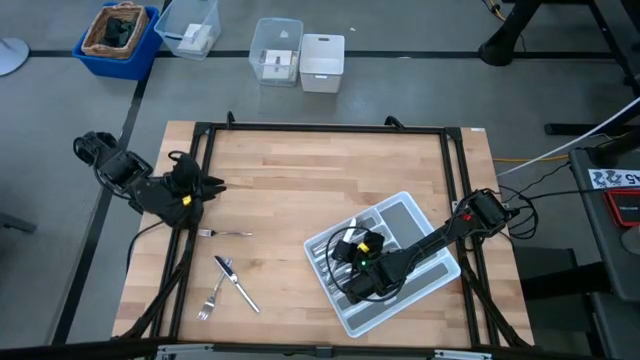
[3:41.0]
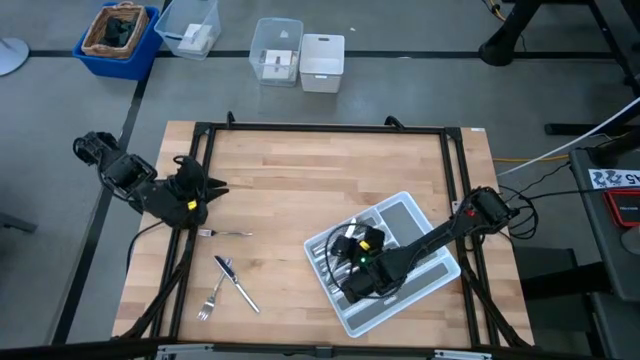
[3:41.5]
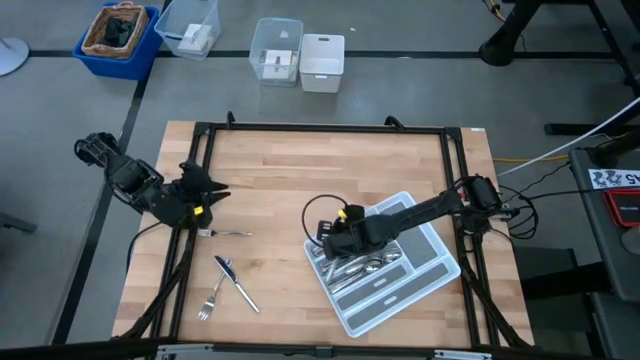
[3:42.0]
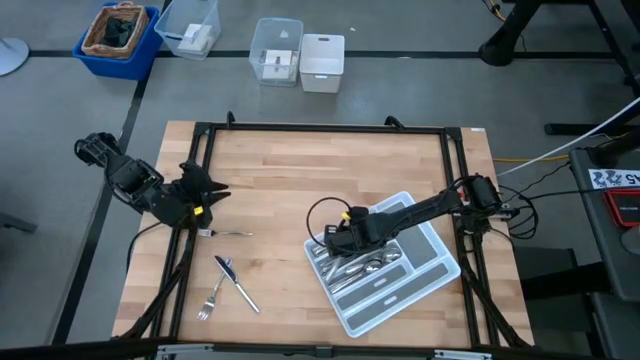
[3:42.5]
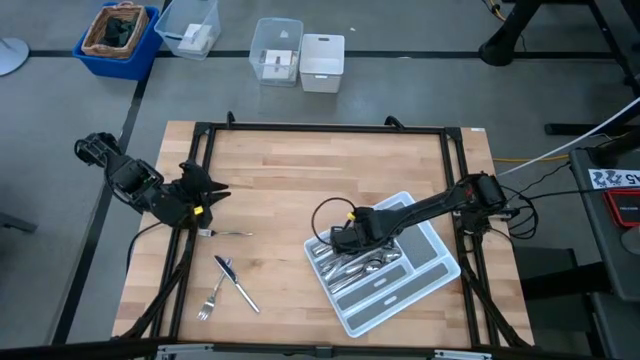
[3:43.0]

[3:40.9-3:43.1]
Task: Sort silverware
Put the silver table knife into the silverware tray

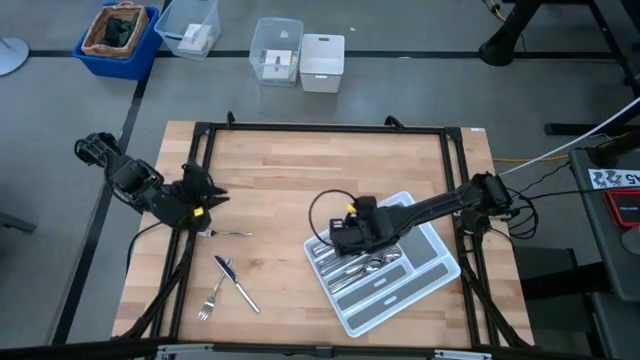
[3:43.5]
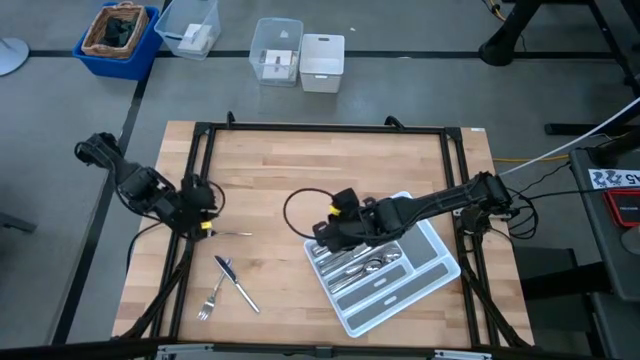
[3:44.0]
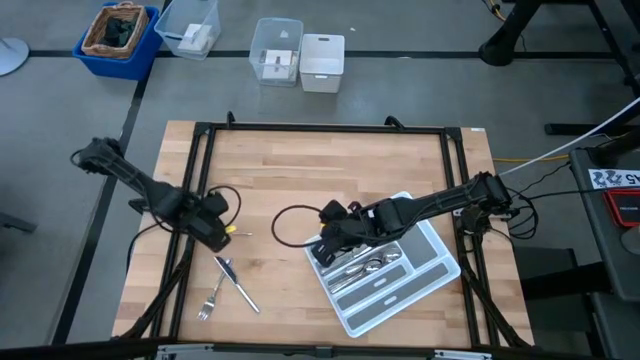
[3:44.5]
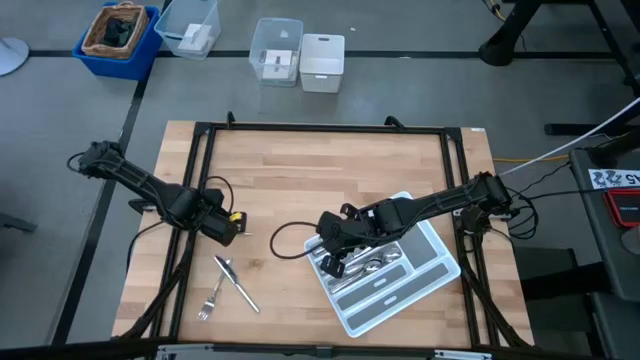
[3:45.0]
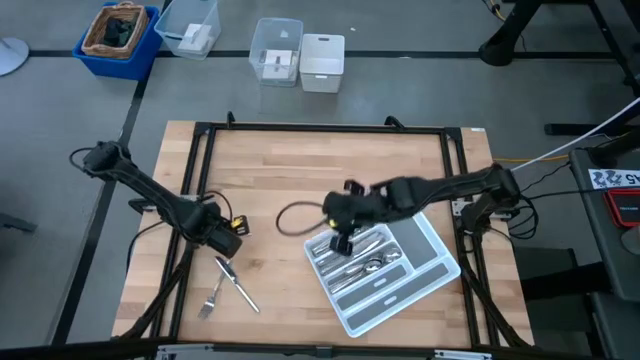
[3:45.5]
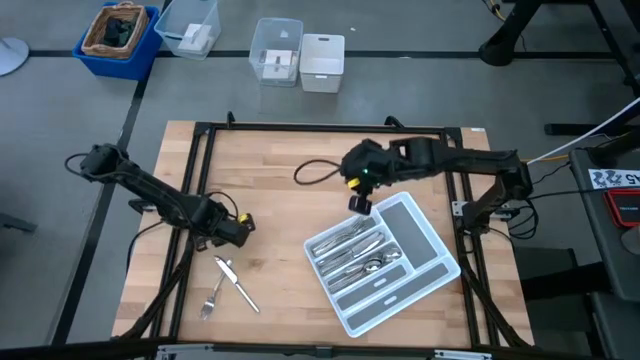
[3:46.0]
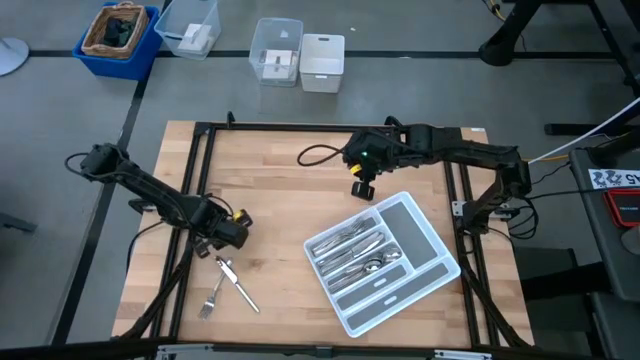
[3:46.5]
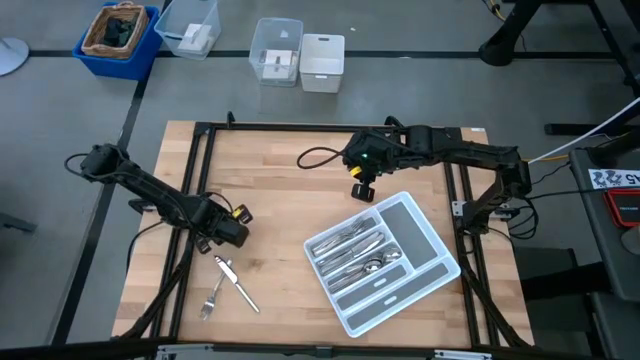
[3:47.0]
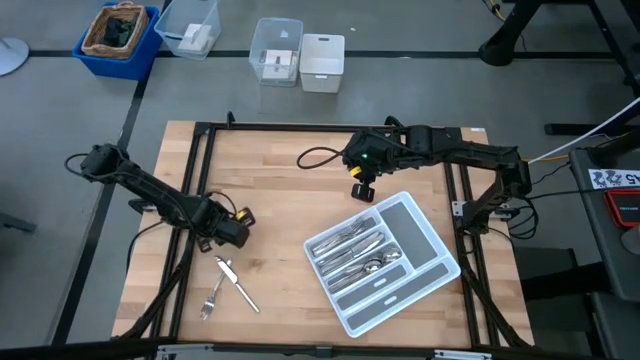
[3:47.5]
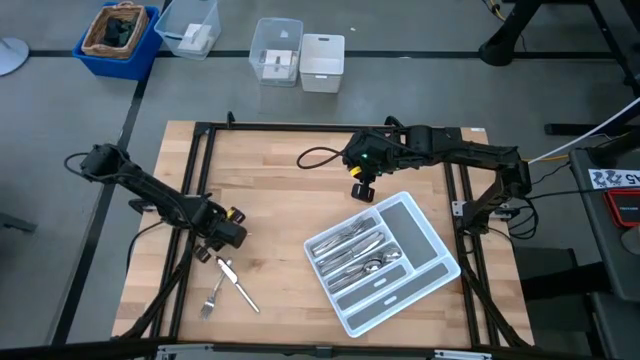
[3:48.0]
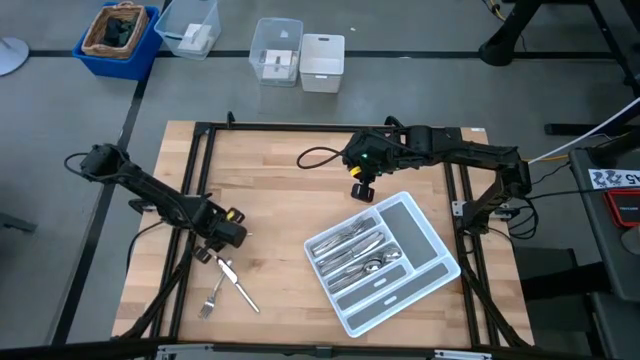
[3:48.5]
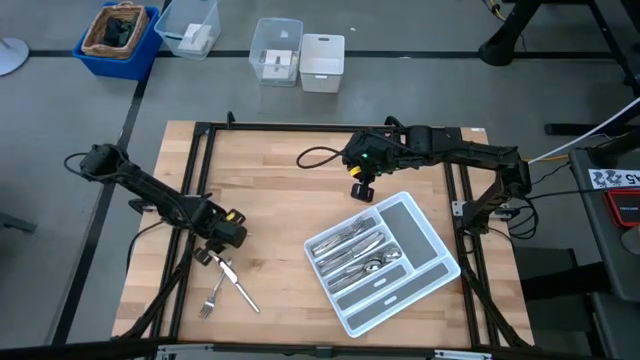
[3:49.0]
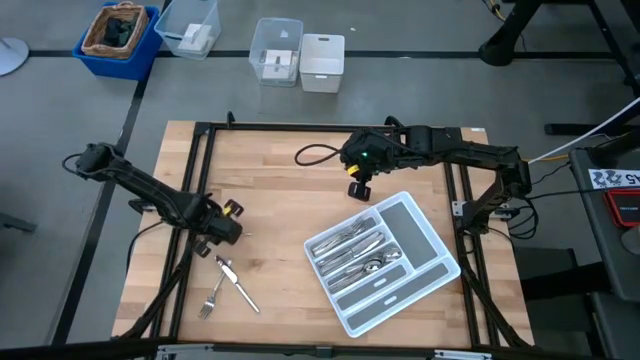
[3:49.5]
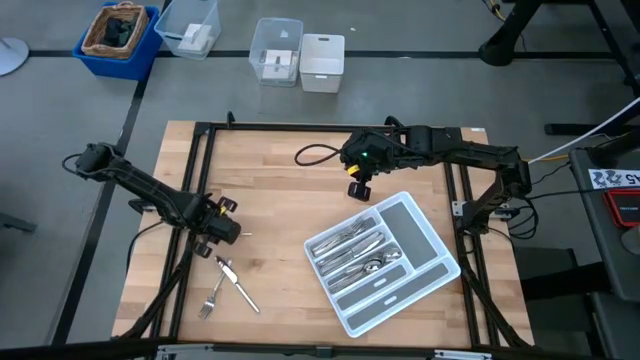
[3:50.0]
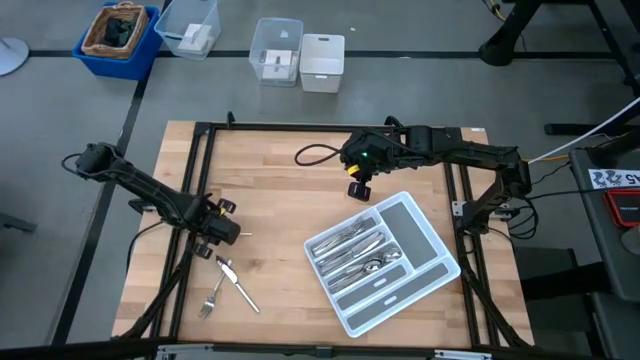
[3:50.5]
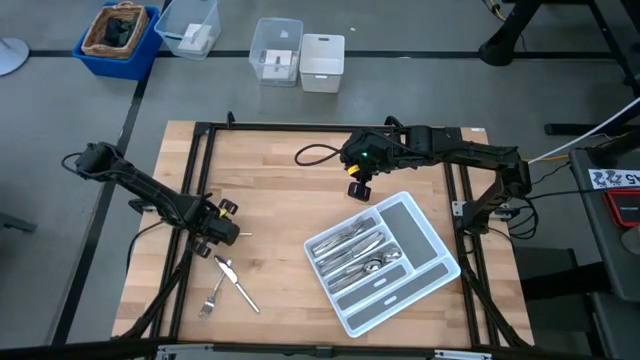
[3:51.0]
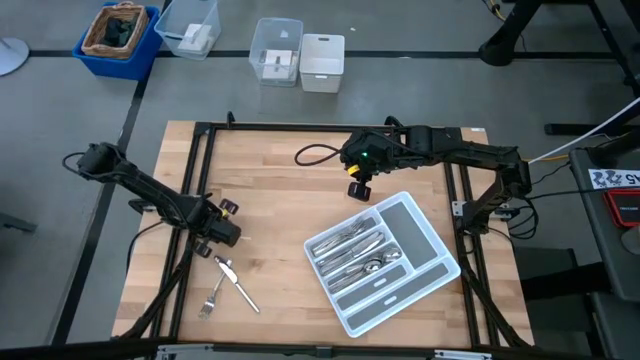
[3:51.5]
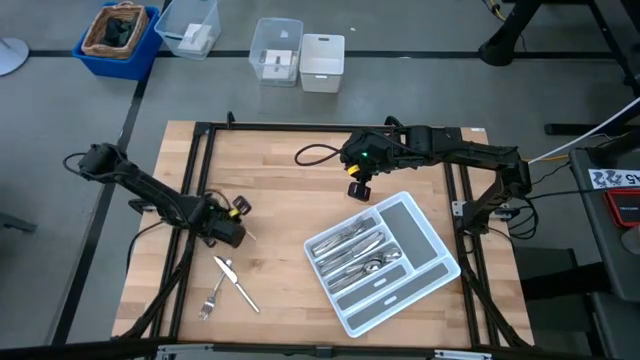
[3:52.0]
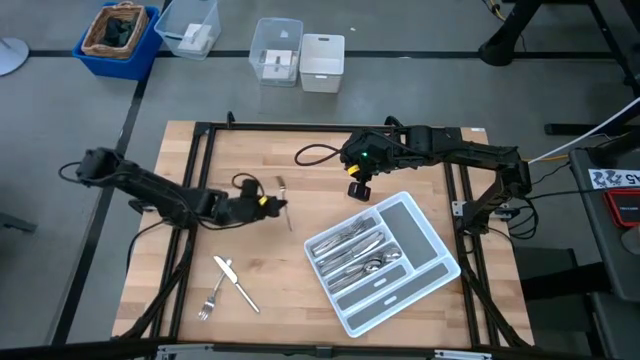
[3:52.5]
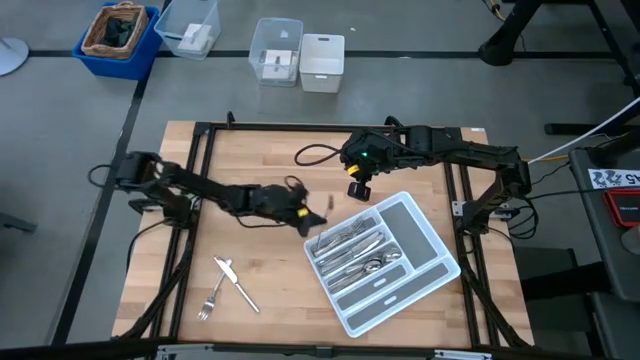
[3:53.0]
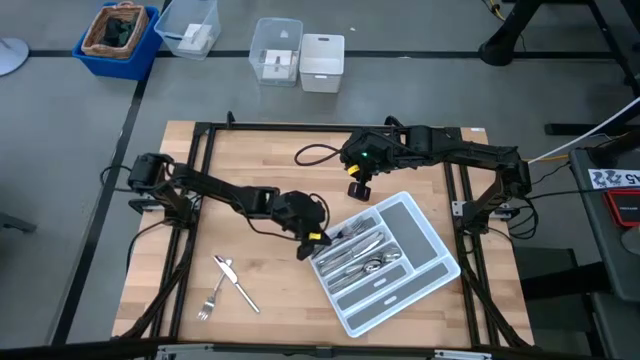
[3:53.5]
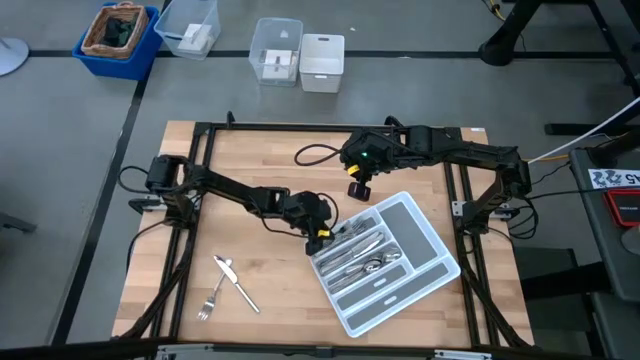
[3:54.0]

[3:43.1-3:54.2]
Put the silver fork into the silverware tray

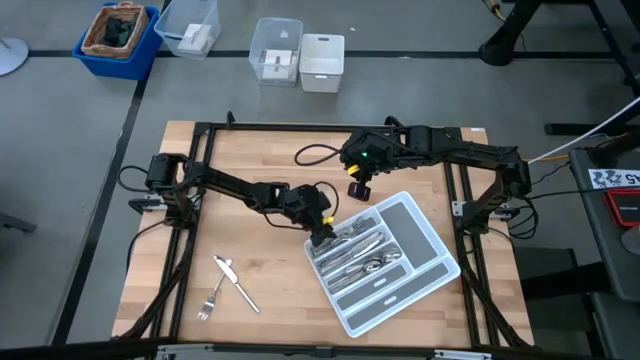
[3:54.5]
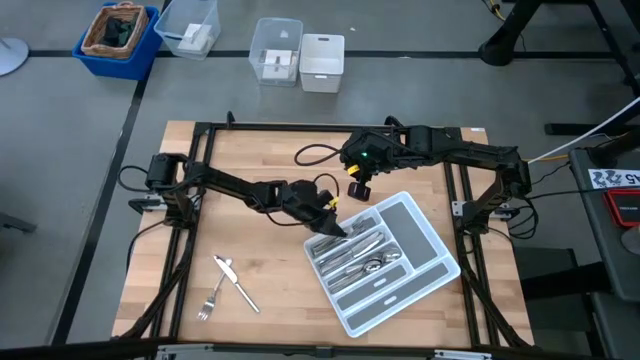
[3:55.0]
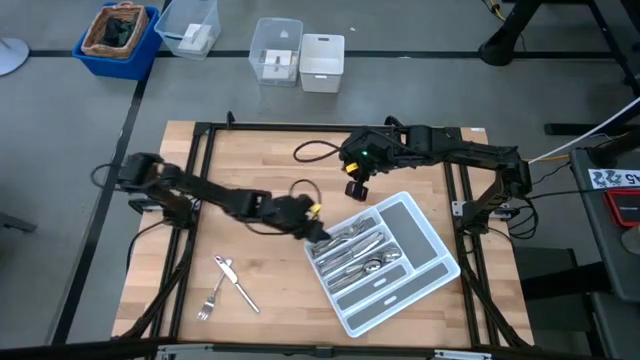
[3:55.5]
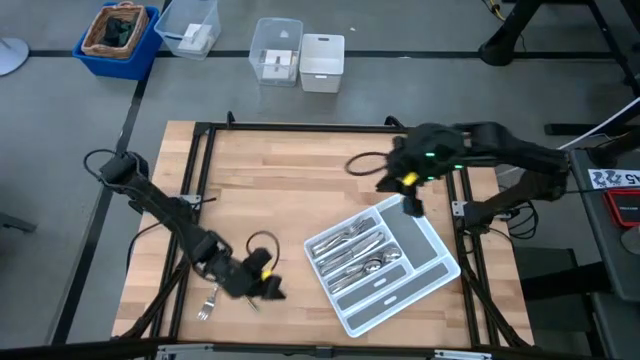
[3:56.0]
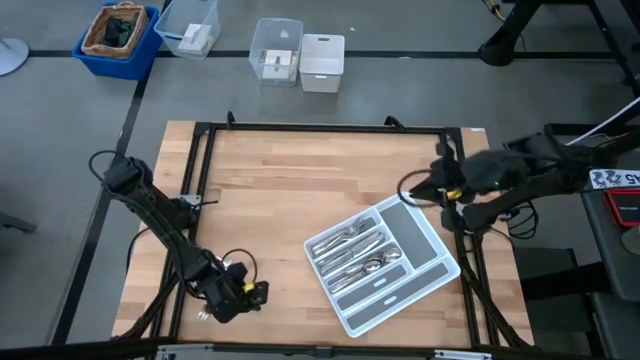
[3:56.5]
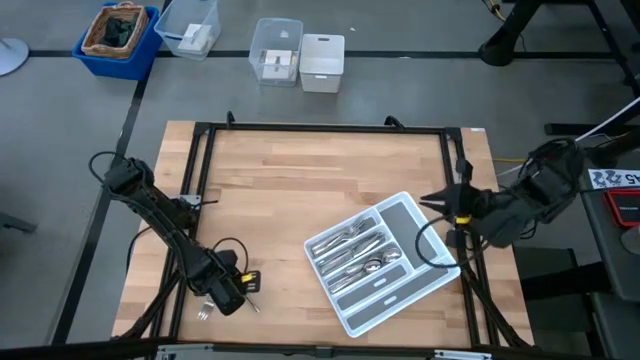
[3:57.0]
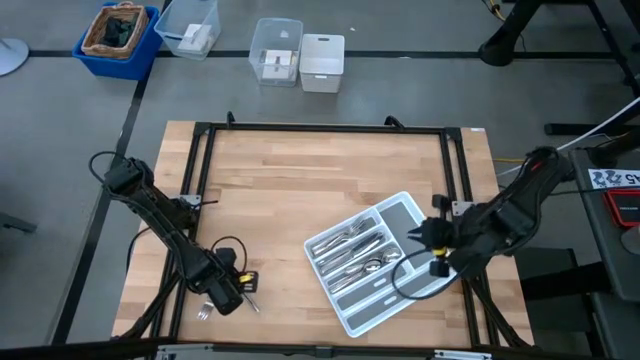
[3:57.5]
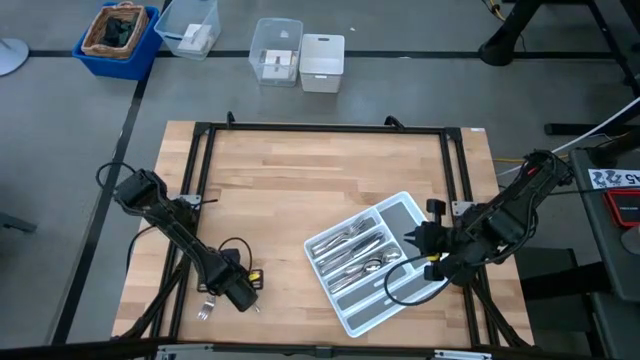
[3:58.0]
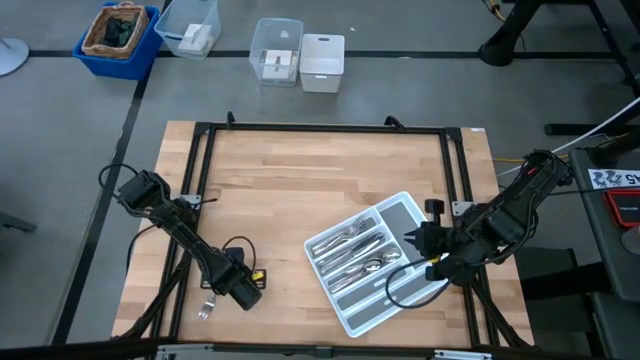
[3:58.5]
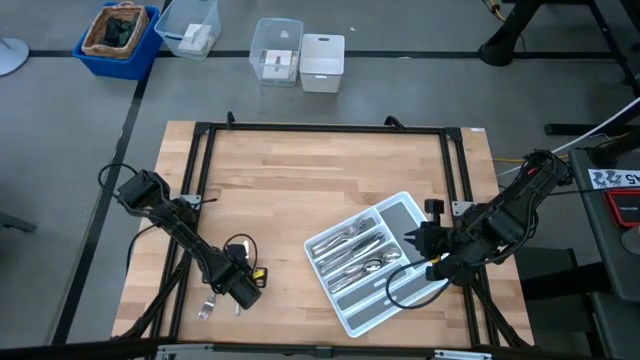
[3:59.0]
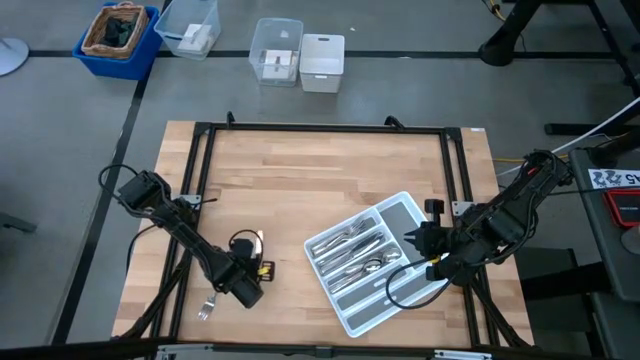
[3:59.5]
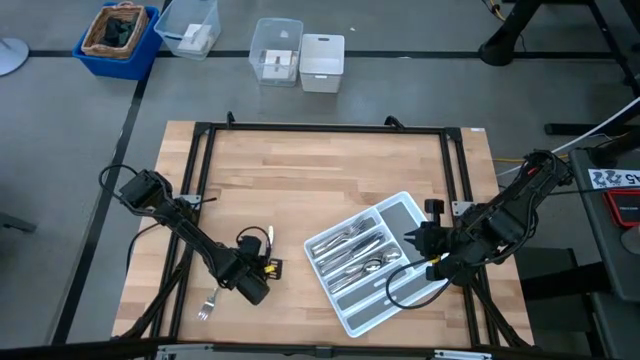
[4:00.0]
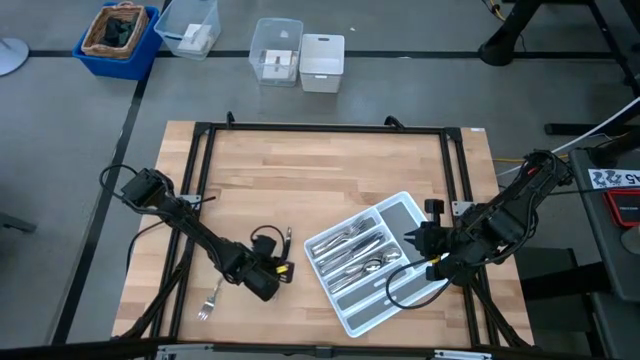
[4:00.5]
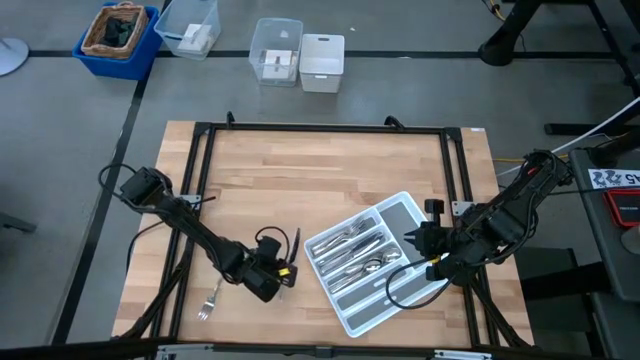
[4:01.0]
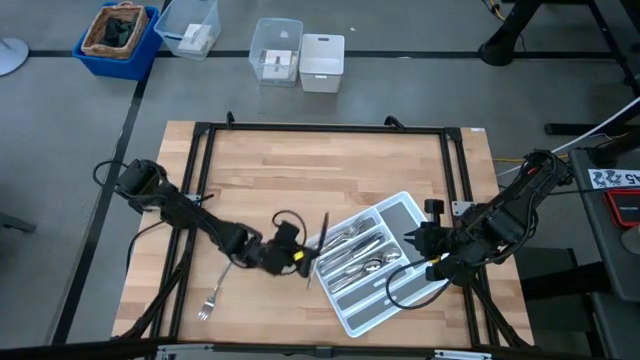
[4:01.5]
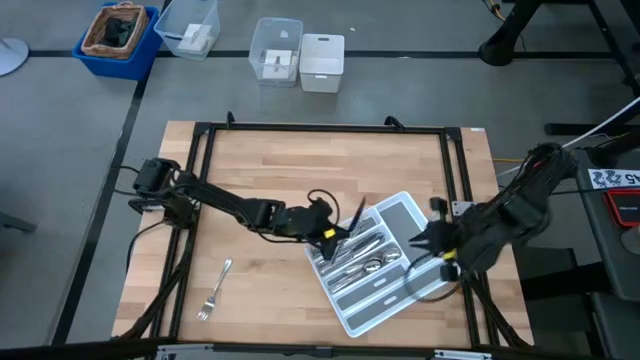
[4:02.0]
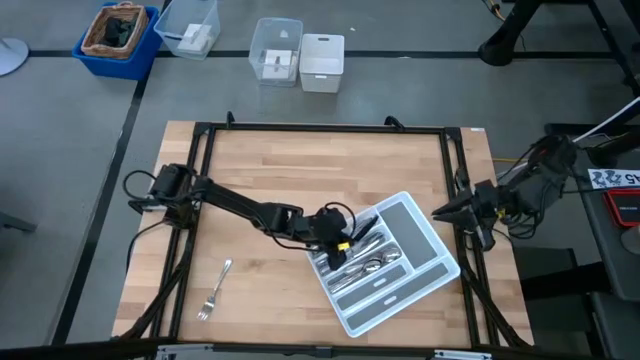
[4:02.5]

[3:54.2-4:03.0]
Put the silver table knife into the silverware tray
